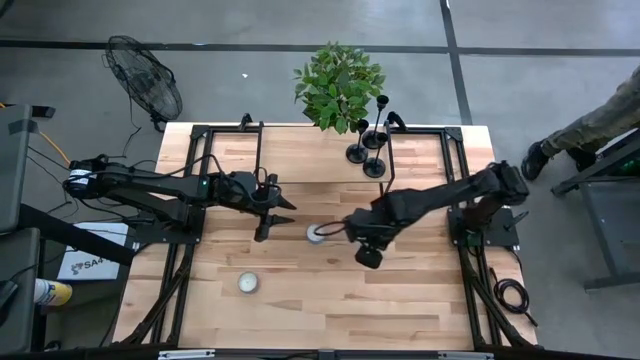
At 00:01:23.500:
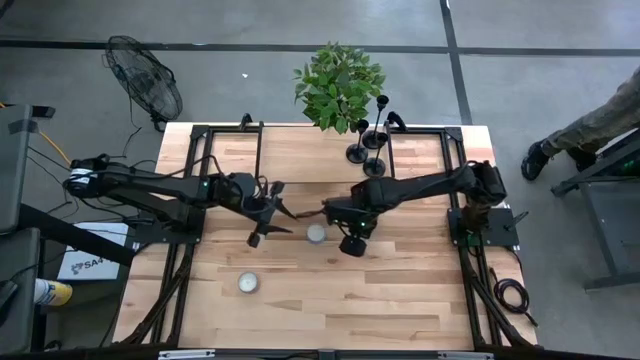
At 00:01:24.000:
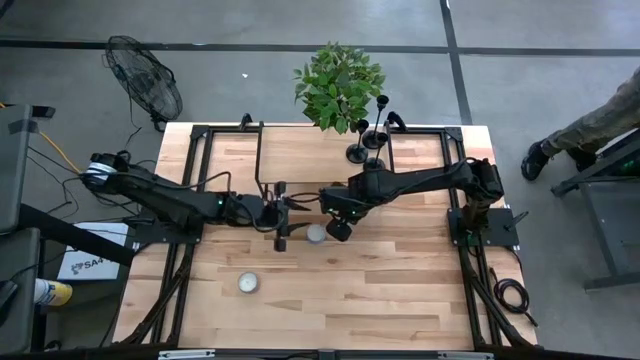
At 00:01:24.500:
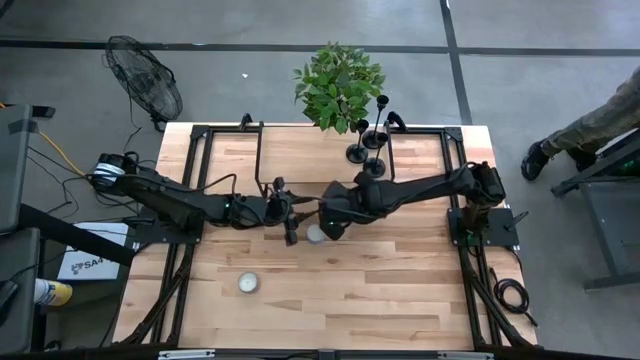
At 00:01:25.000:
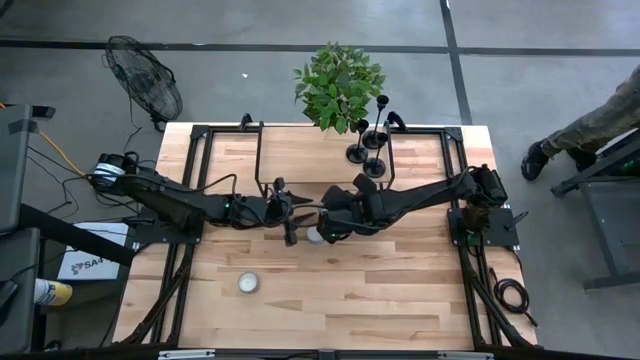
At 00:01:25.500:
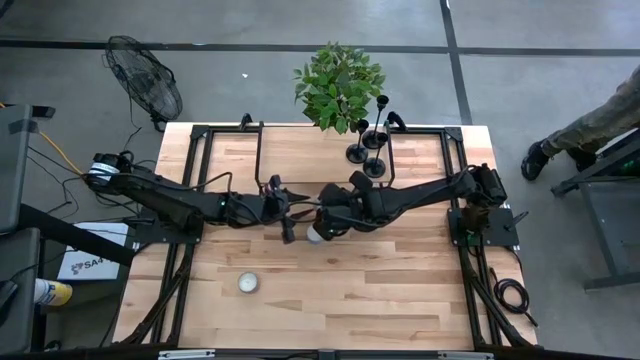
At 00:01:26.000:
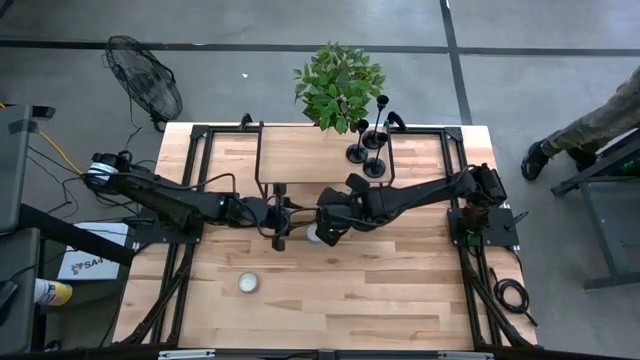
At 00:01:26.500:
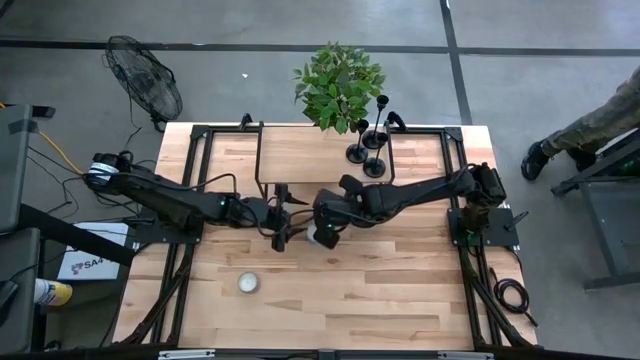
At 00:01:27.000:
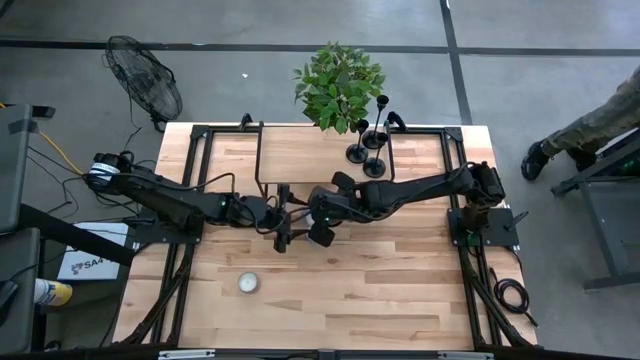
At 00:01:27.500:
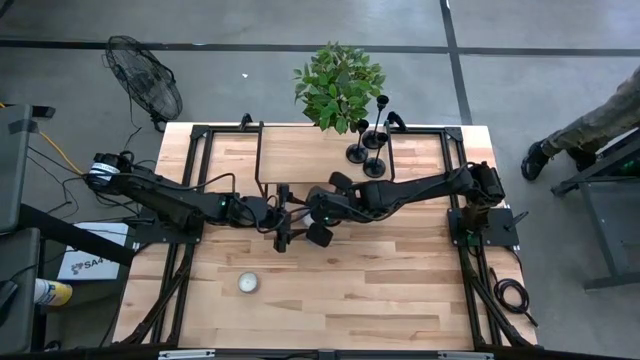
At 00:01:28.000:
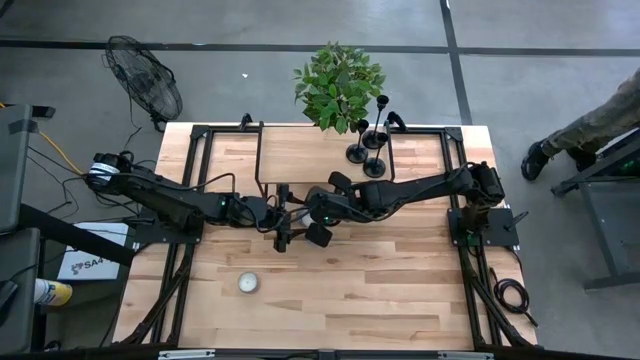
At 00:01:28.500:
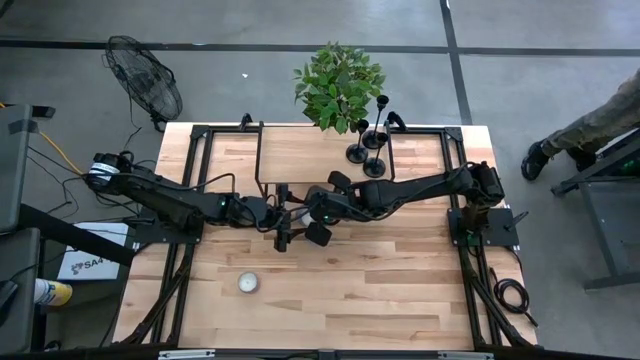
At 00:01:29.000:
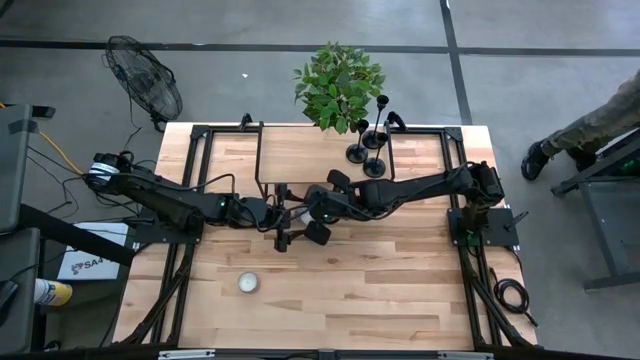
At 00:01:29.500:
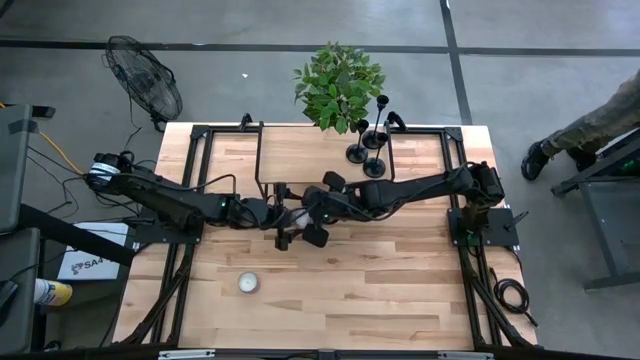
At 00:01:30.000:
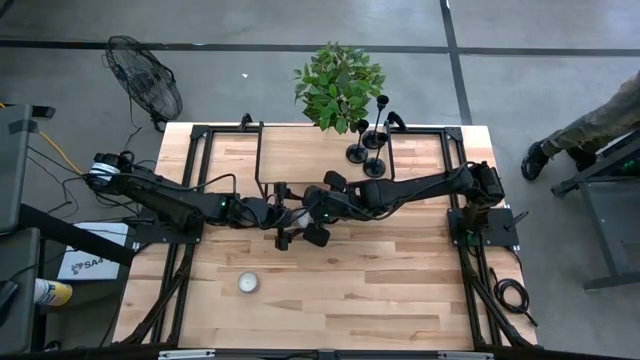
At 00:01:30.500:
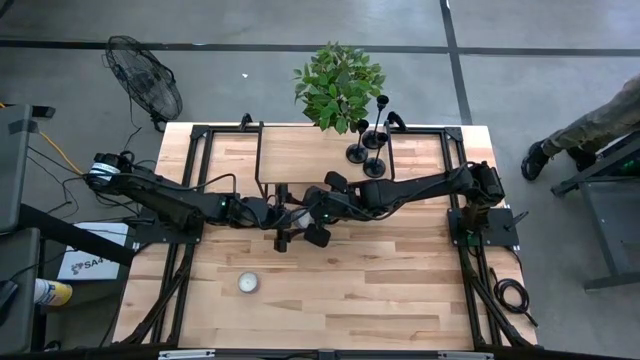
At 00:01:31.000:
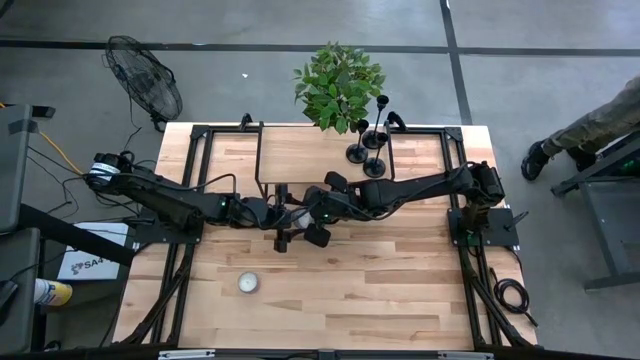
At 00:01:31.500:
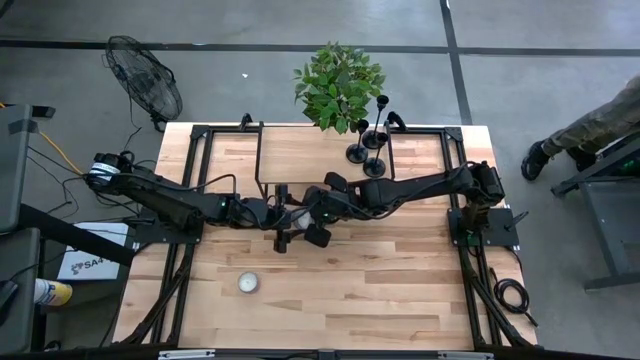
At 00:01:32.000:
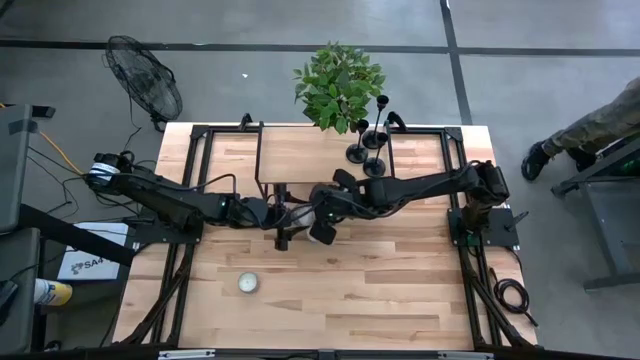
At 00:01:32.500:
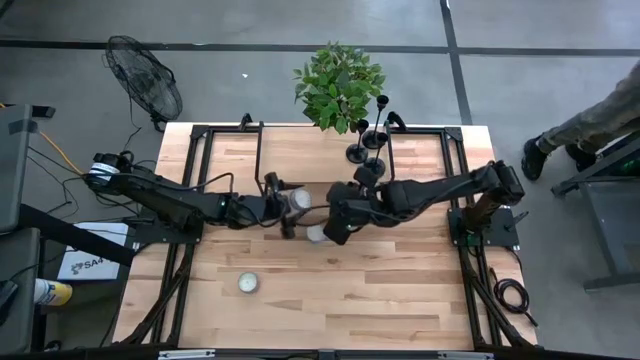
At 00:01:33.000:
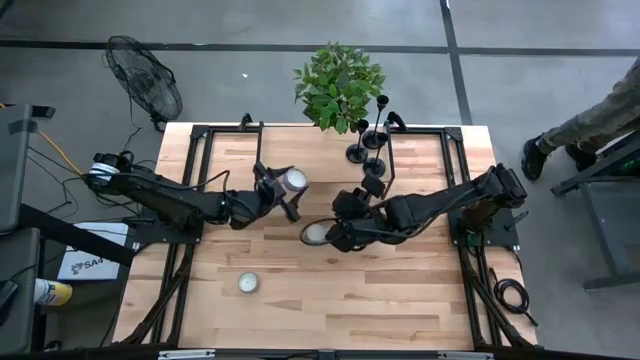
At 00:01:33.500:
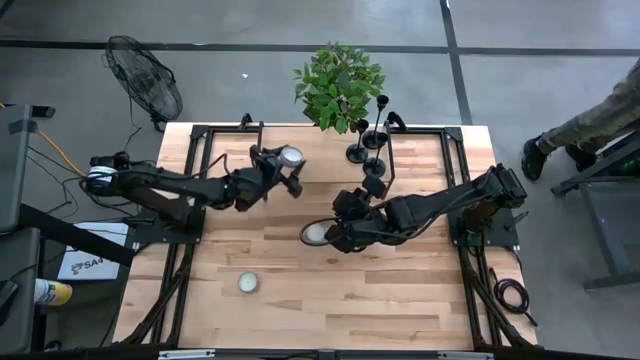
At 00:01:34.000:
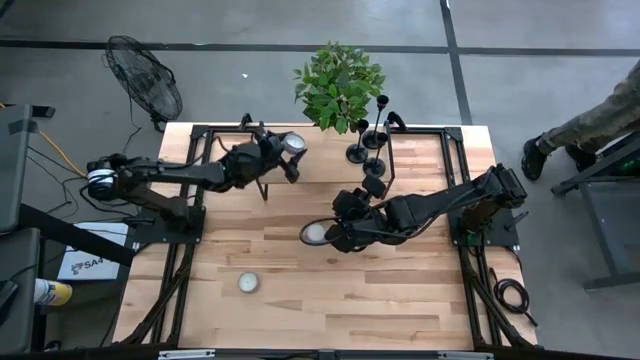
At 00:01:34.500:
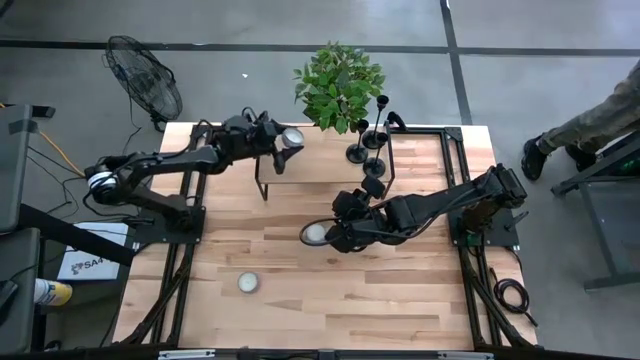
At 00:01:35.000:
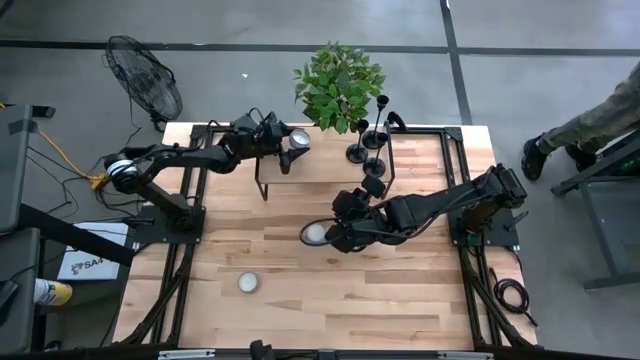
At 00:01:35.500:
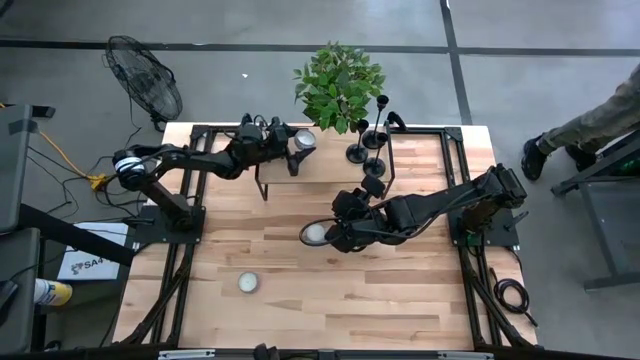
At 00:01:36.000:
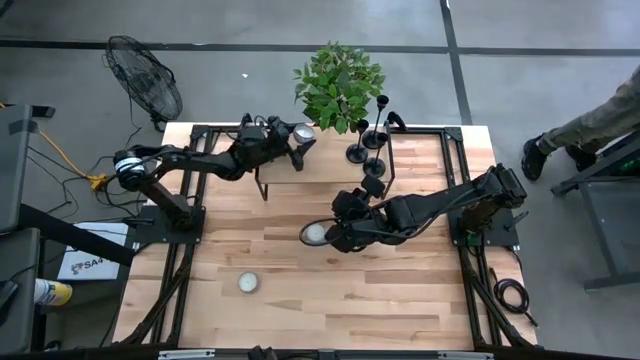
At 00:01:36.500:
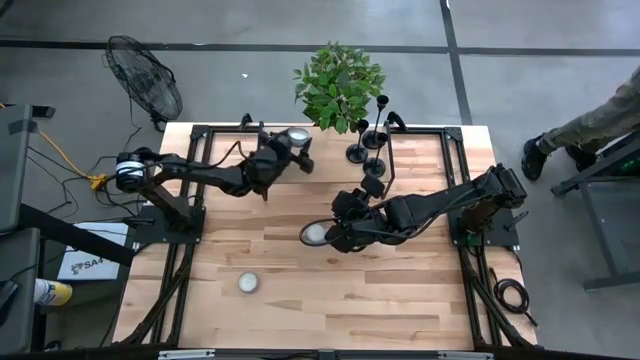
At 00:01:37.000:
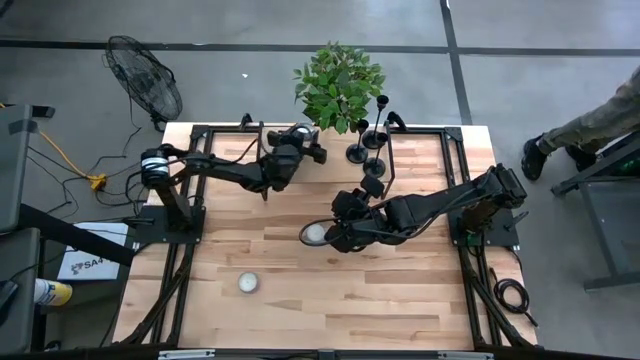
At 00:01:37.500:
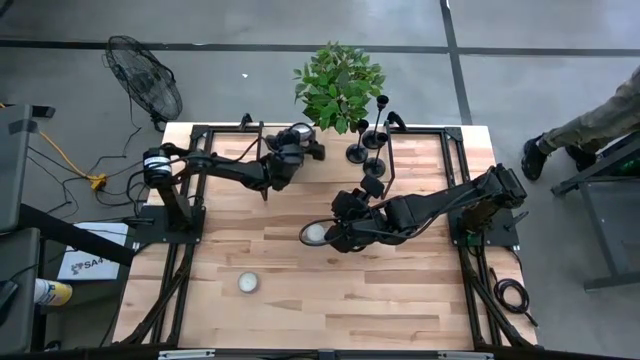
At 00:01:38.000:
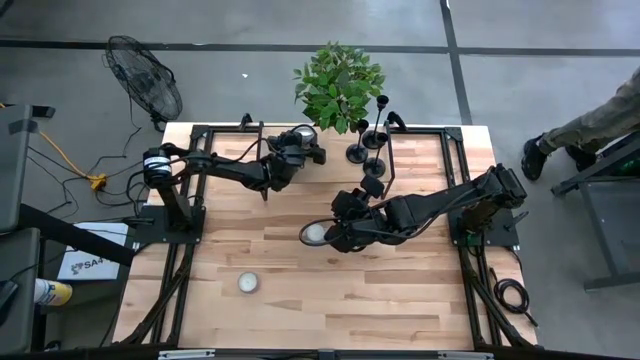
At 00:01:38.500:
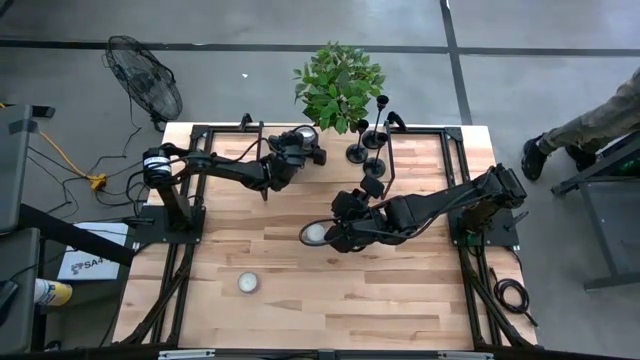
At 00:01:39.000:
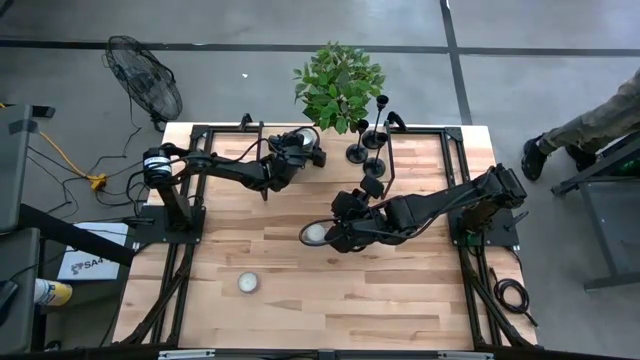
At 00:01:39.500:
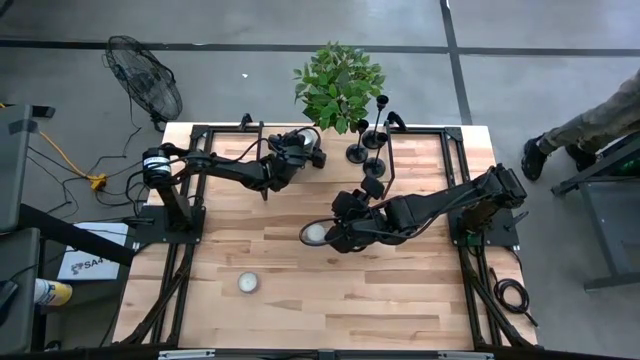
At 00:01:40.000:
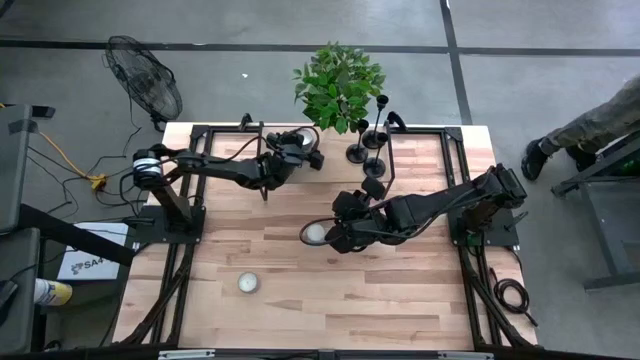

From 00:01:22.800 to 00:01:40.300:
Task: Pick & Place candle stick holders
Put the white scented candle on the shelf

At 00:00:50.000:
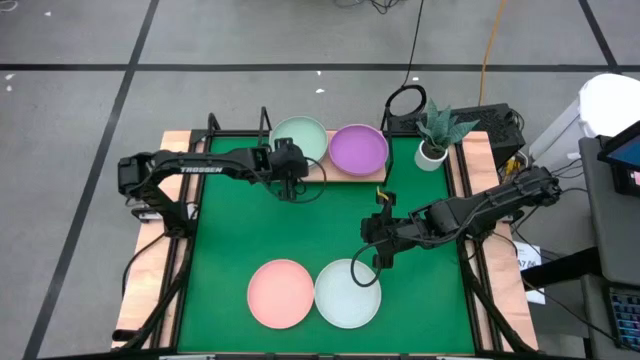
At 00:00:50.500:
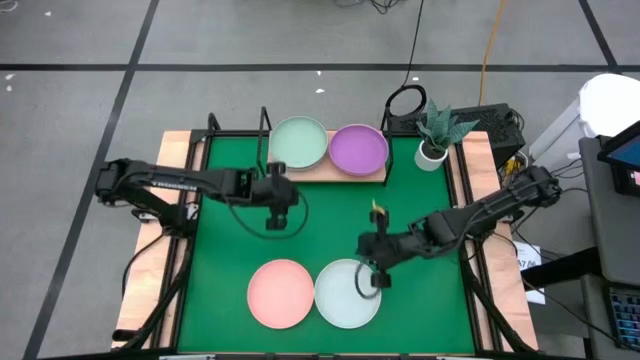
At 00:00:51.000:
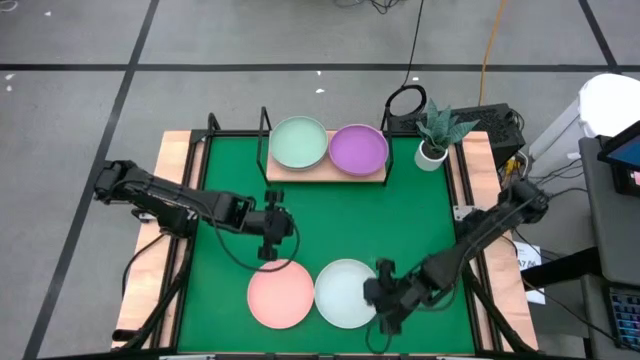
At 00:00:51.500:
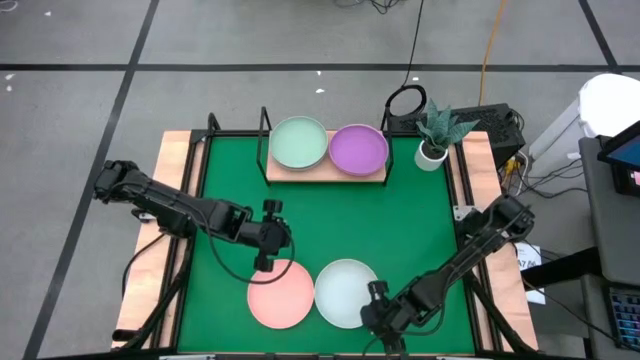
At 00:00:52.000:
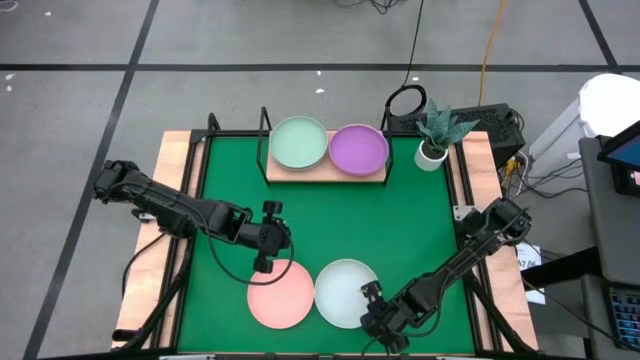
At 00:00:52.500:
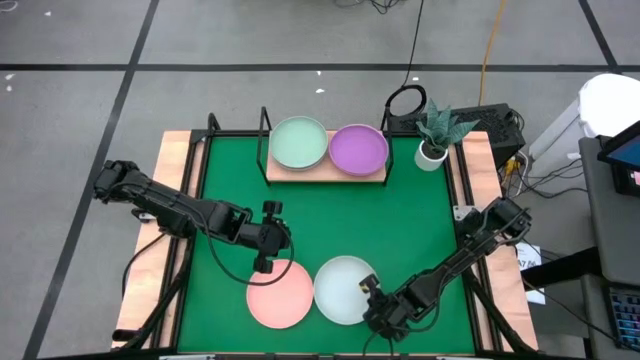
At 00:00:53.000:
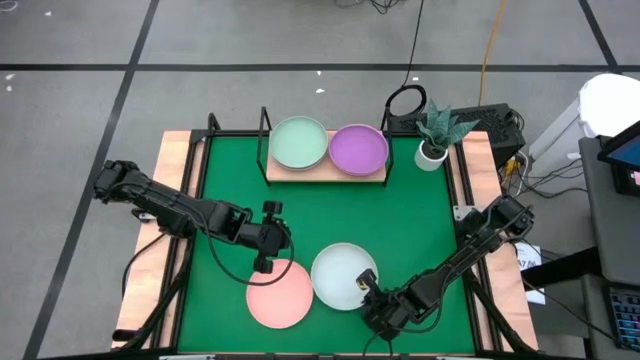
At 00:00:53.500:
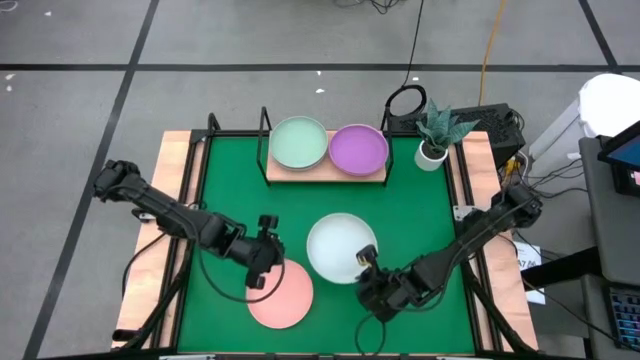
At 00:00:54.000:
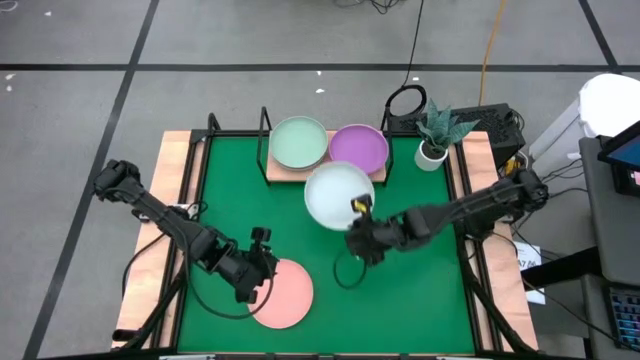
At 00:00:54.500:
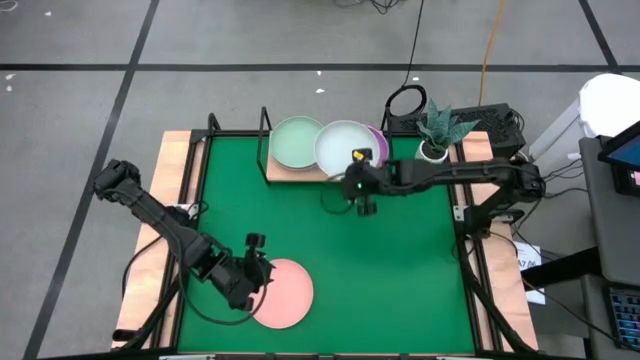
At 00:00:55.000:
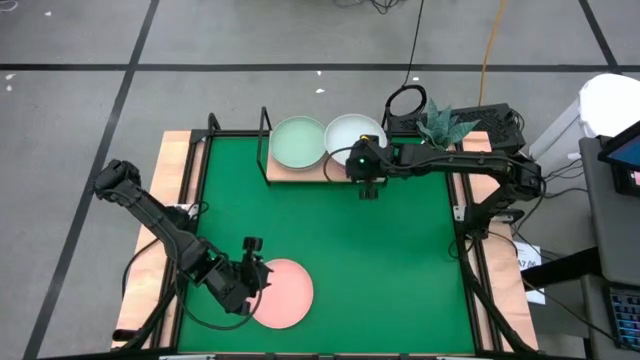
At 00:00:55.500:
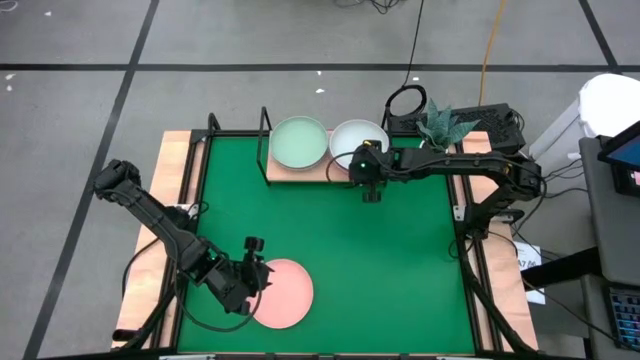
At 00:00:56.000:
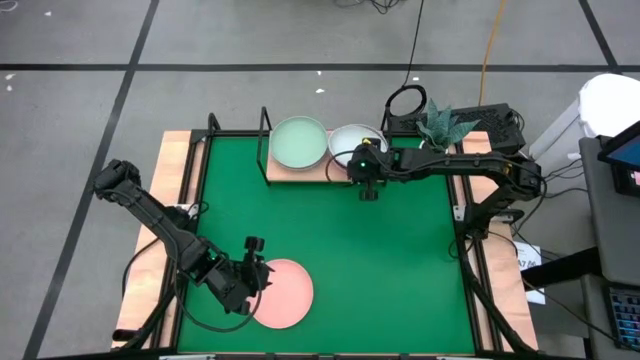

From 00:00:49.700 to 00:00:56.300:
Task: Place and stack plates onto a shelf
Stack the gray plate on top of the purple plate on the shelf
